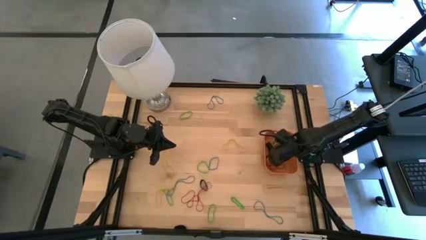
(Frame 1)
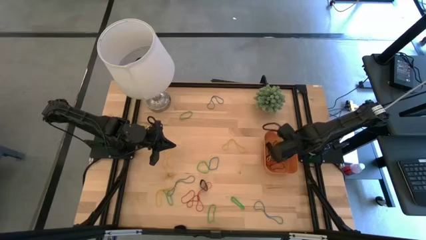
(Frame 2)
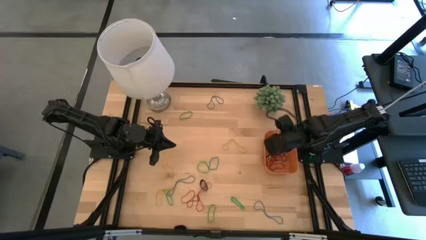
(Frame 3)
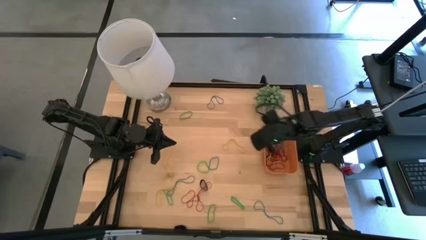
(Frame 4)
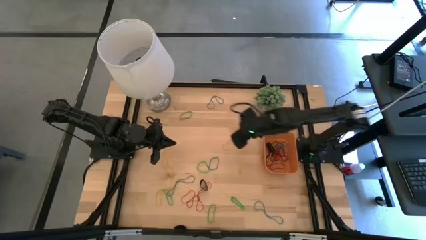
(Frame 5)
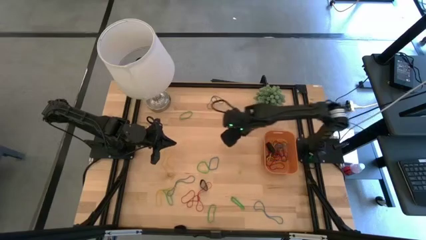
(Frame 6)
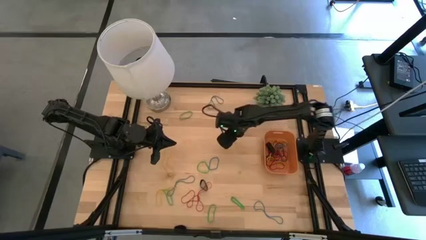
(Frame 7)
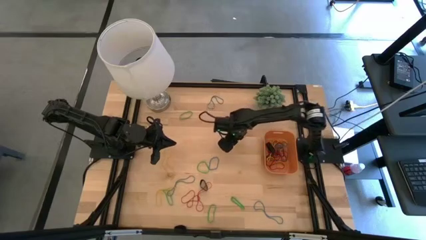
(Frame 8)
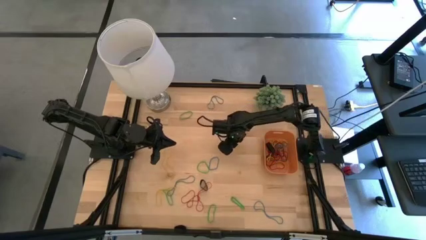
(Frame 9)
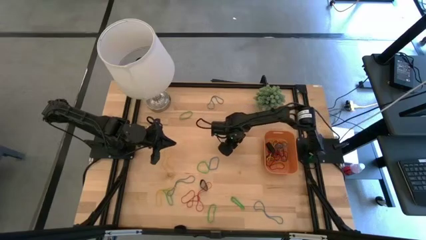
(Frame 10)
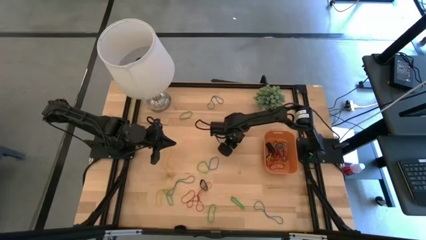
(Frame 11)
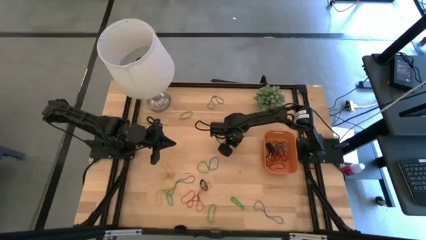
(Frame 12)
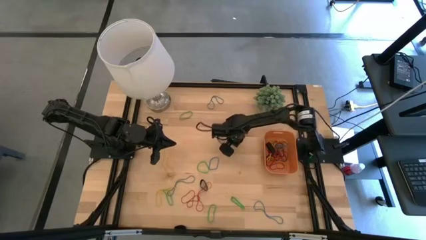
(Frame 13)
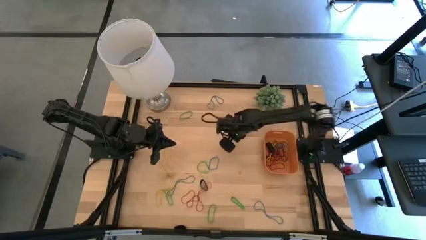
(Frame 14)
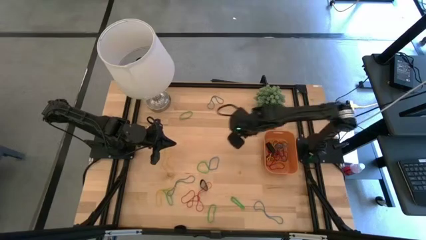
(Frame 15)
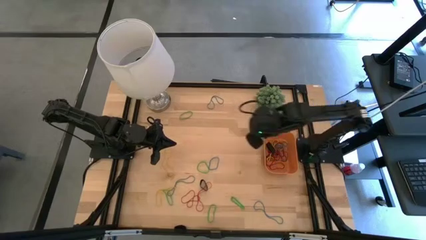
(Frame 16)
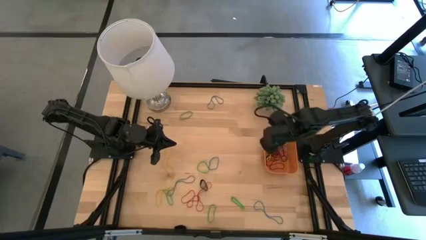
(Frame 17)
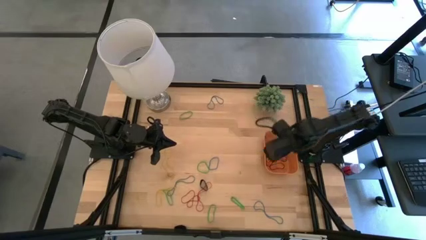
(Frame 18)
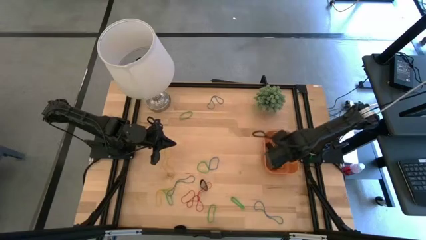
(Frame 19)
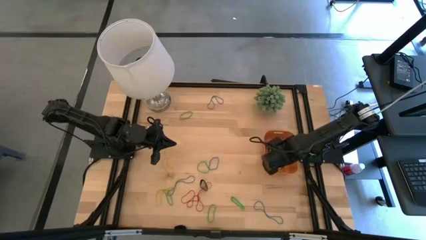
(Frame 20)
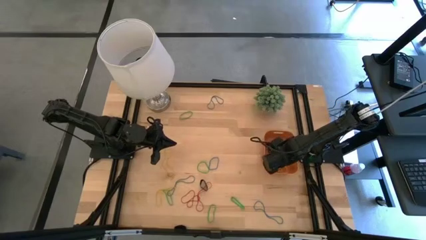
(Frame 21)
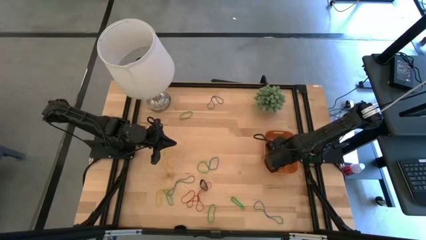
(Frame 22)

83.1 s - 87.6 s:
Task: Pick and place rubber bands into bin
Put the yellow rubber band into the orange bin

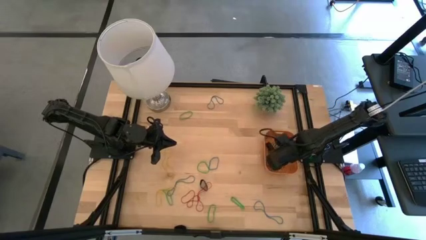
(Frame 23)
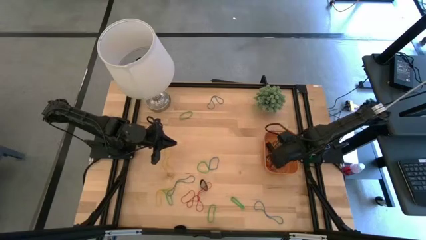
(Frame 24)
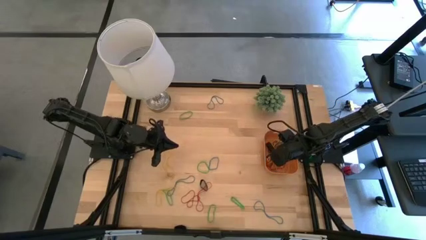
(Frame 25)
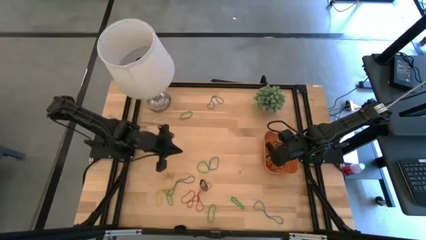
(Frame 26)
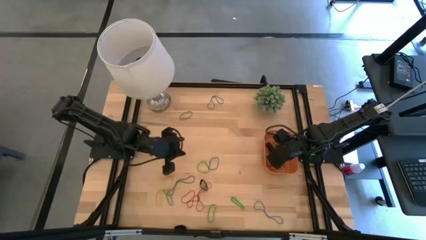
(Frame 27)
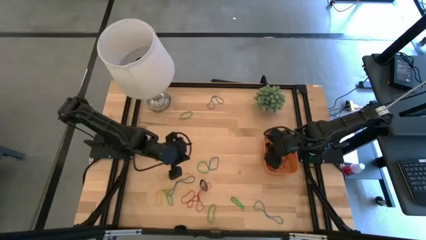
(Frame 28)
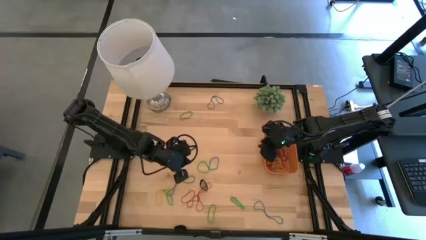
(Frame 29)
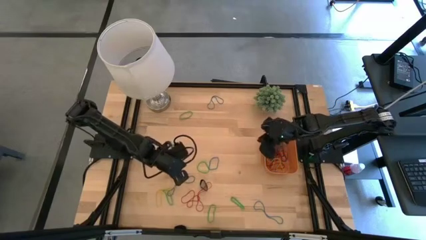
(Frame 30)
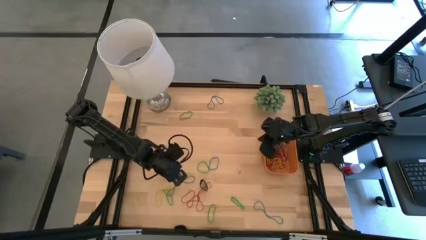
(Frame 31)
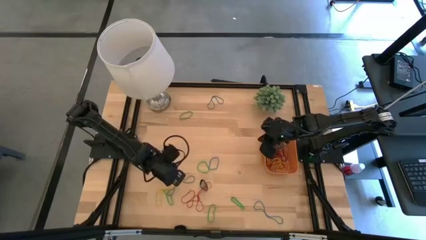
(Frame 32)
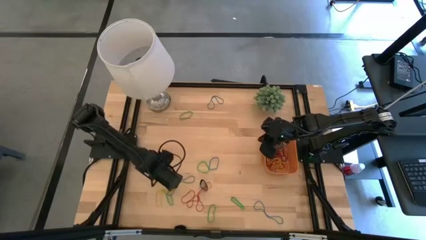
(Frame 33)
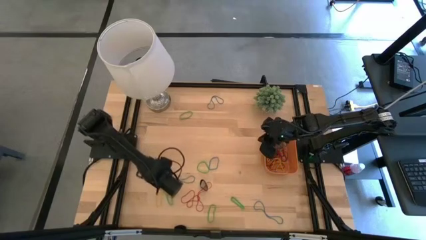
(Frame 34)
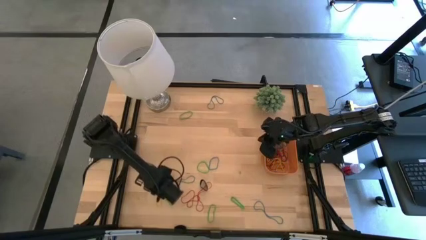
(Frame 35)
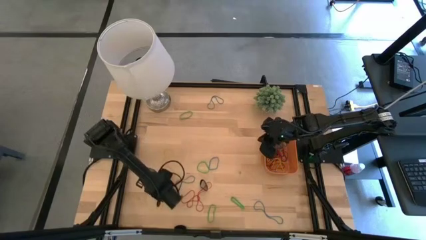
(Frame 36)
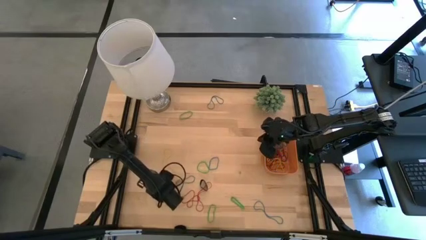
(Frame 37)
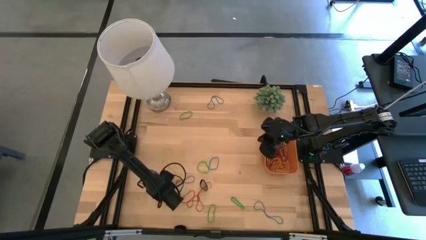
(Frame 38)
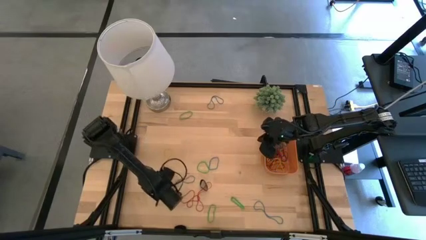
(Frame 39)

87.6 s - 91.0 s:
Put the yellow rubber band into the orange bin

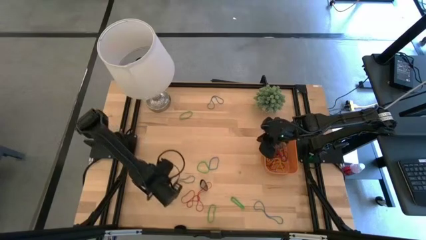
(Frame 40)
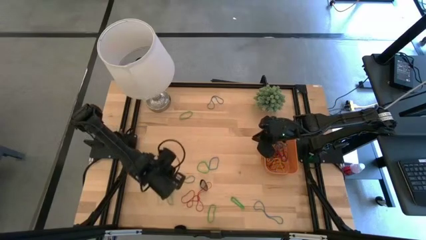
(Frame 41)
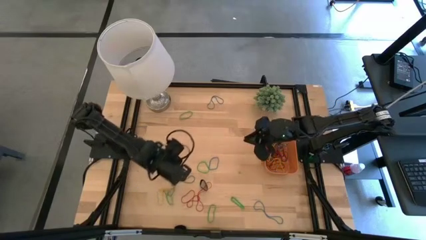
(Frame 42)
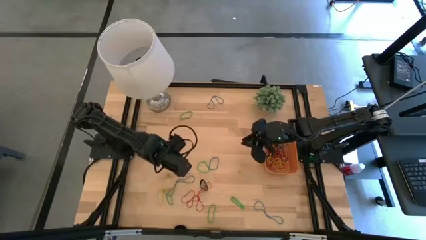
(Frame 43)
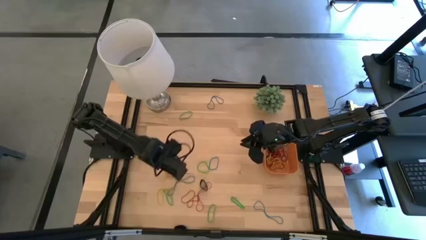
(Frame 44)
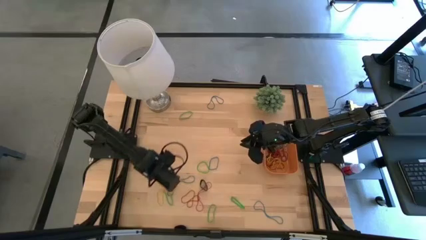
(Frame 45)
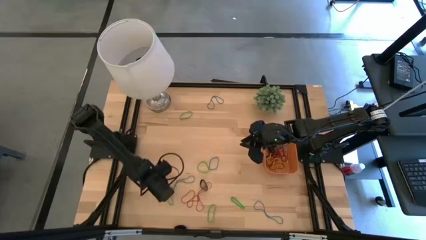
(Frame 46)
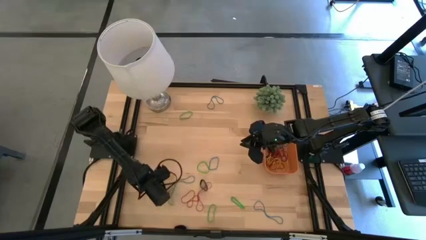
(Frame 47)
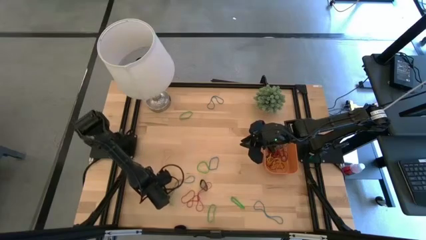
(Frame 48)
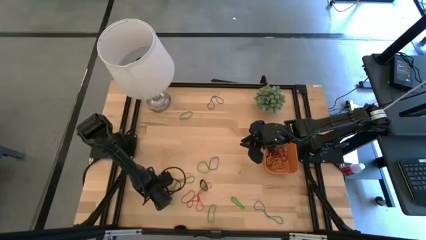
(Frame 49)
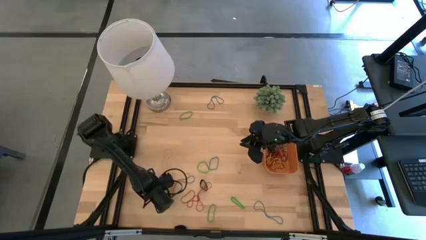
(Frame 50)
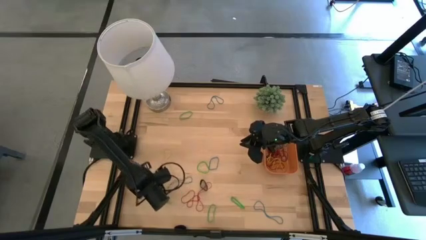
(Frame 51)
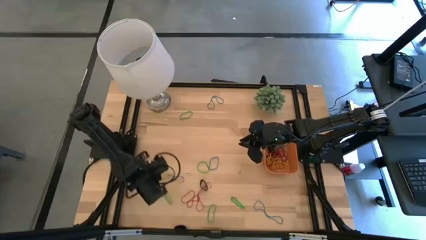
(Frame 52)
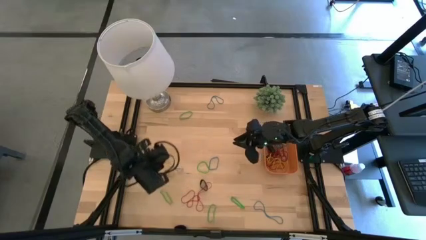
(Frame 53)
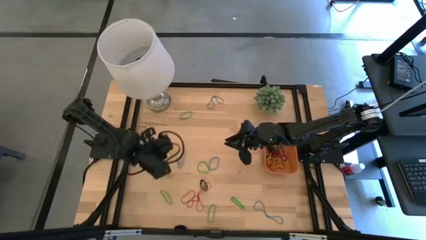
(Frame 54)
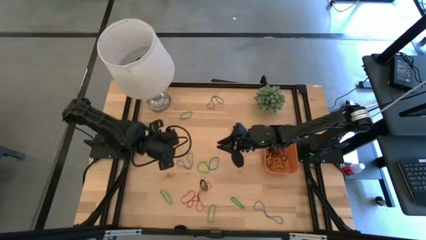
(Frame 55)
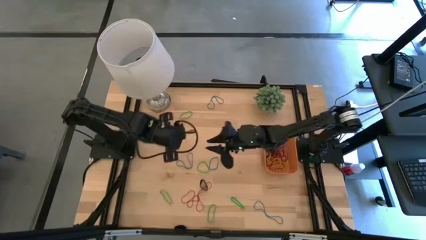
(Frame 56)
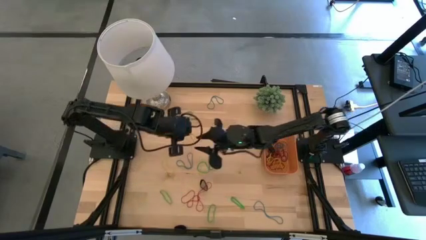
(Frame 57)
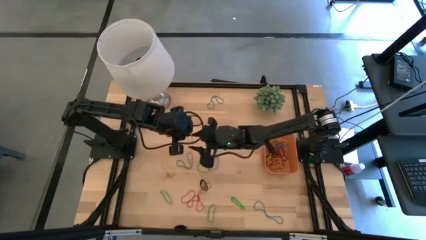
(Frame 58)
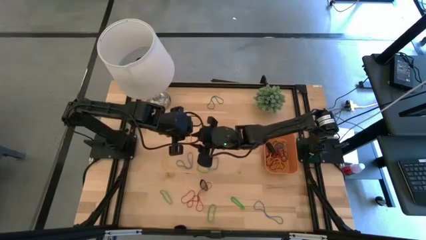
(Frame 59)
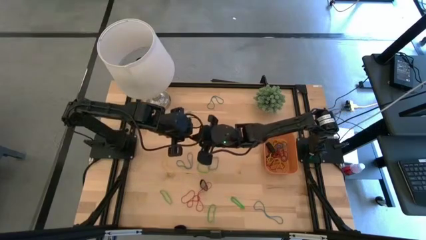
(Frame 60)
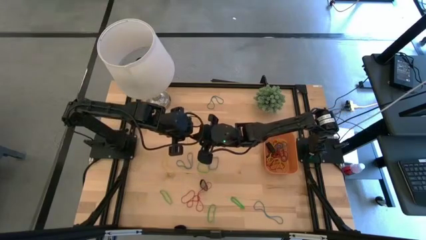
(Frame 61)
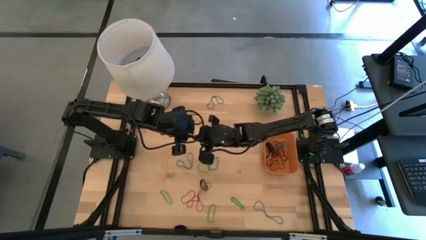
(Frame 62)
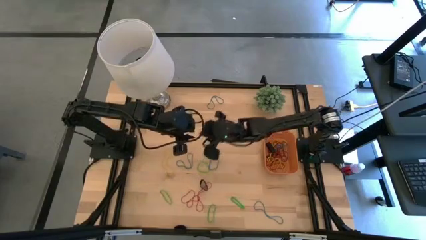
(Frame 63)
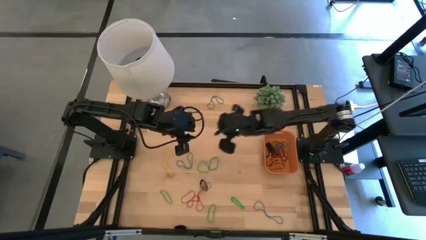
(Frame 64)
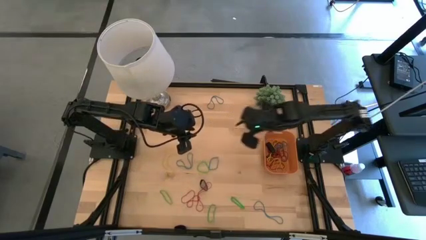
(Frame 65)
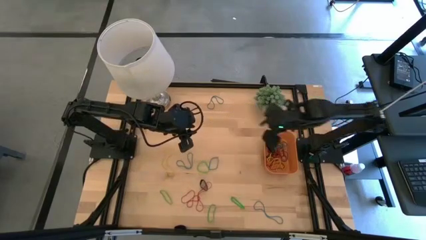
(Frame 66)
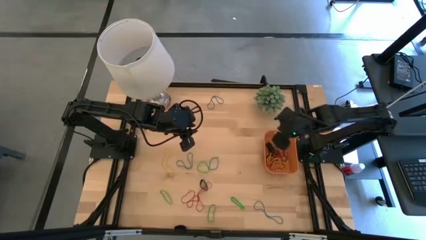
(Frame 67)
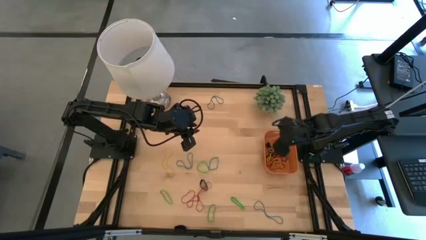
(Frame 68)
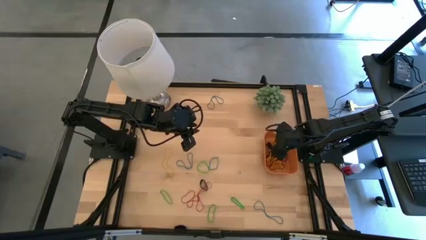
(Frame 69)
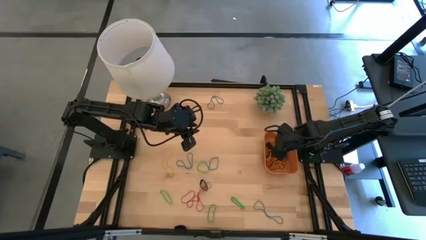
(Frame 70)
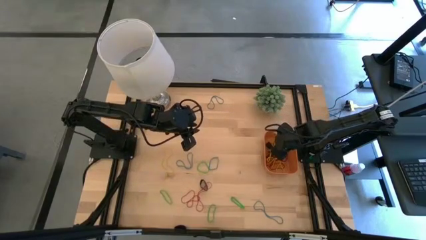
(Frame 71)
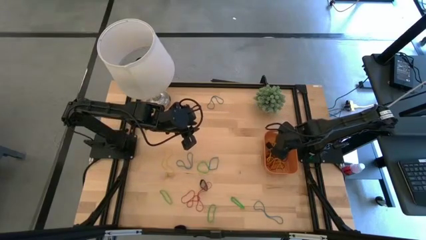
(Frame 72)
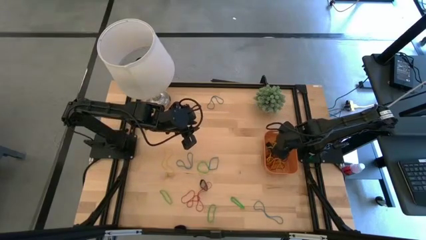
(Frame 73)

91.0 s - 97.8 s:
Put the yellow rubber band into the orange bin
